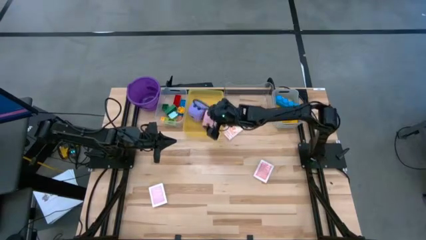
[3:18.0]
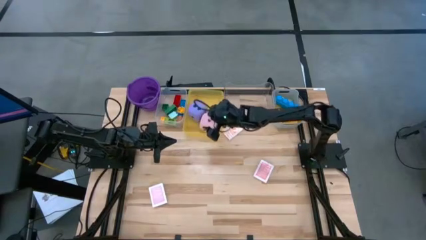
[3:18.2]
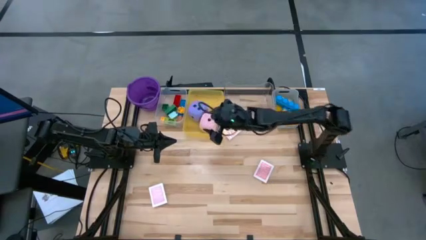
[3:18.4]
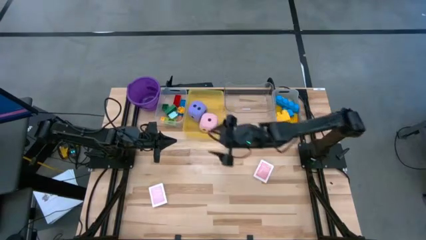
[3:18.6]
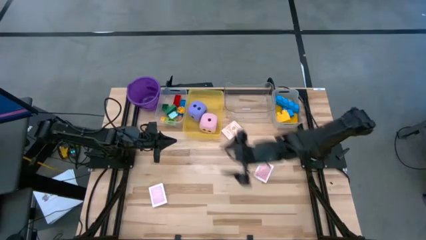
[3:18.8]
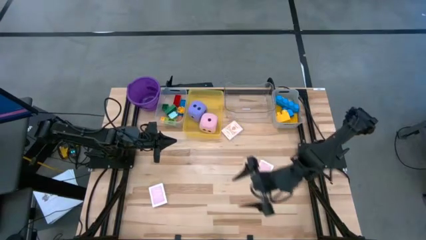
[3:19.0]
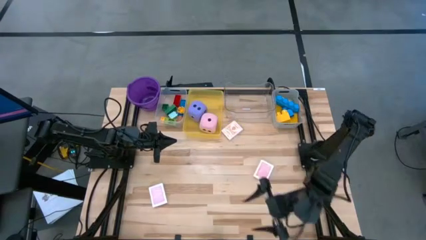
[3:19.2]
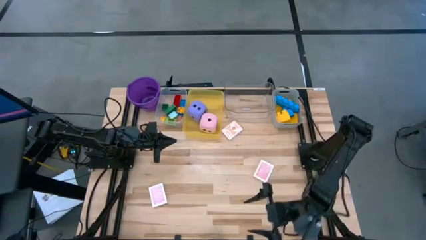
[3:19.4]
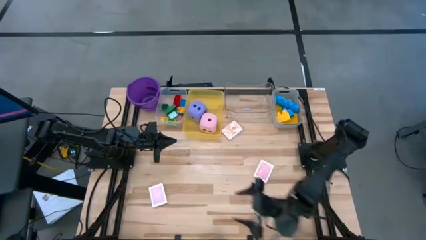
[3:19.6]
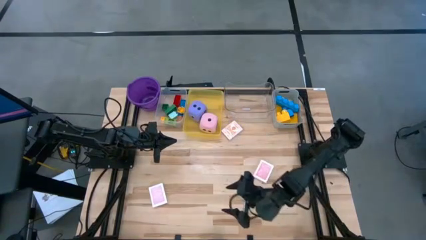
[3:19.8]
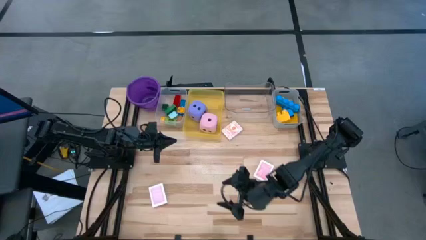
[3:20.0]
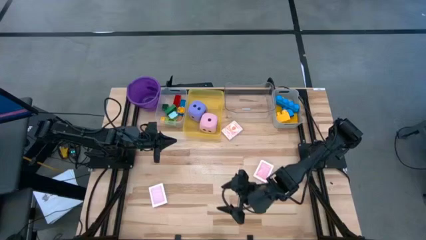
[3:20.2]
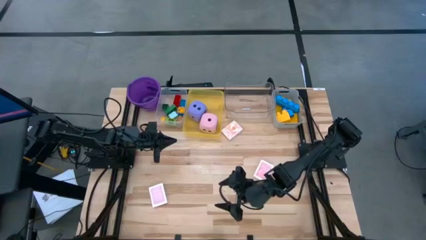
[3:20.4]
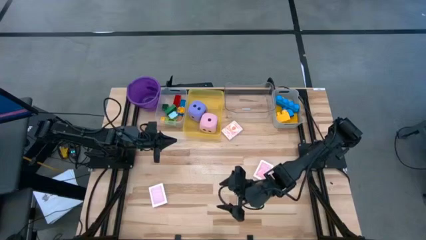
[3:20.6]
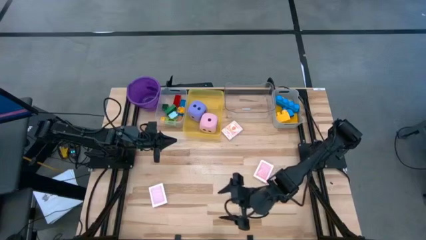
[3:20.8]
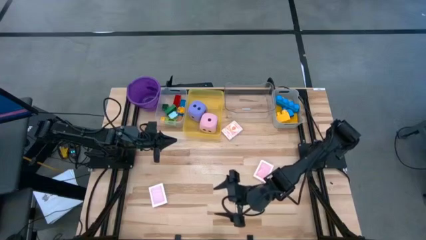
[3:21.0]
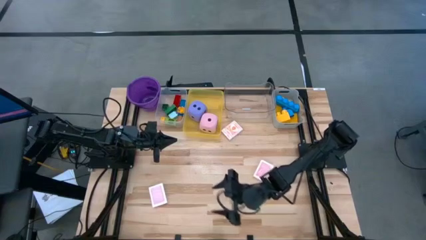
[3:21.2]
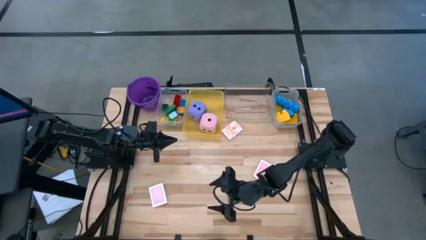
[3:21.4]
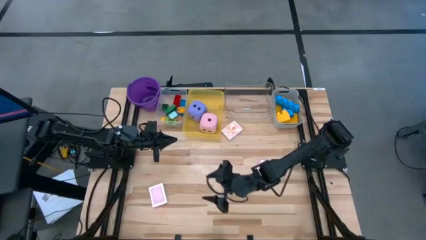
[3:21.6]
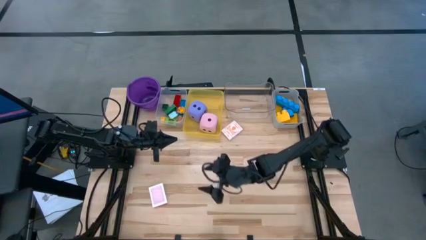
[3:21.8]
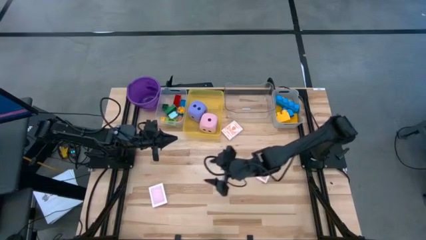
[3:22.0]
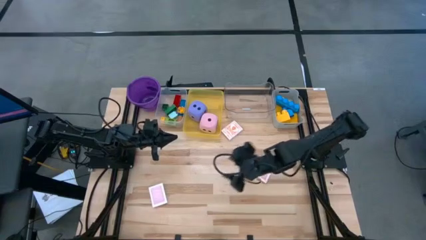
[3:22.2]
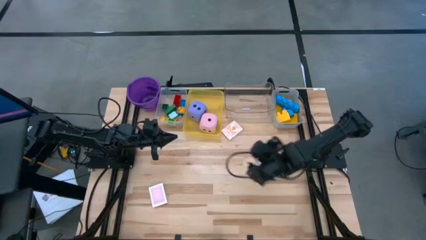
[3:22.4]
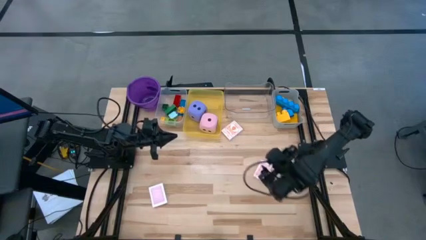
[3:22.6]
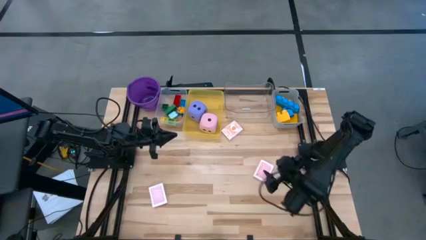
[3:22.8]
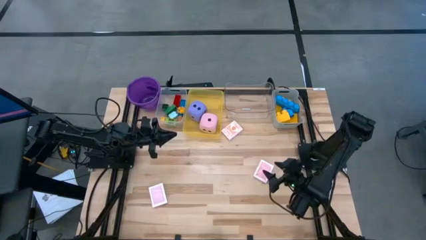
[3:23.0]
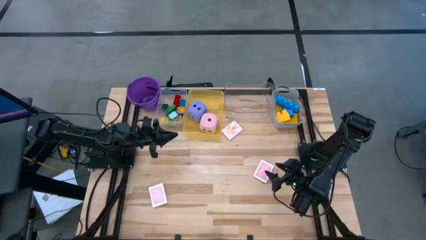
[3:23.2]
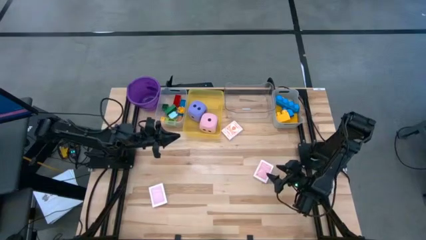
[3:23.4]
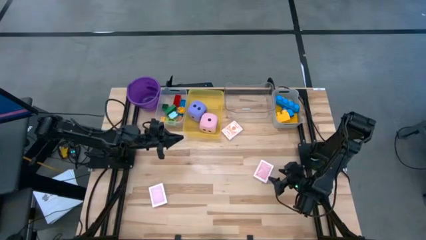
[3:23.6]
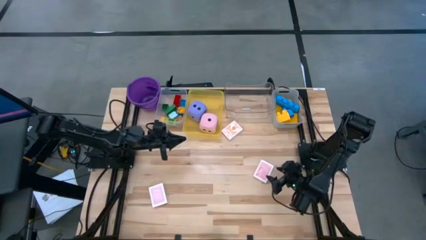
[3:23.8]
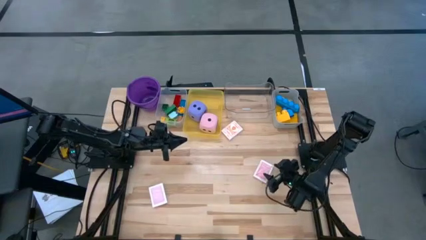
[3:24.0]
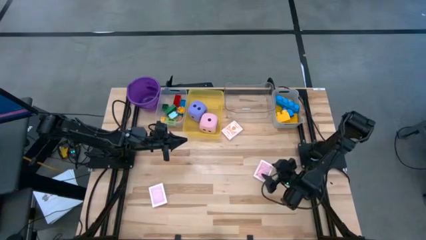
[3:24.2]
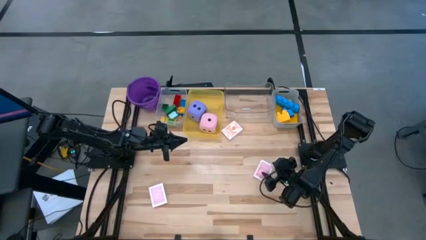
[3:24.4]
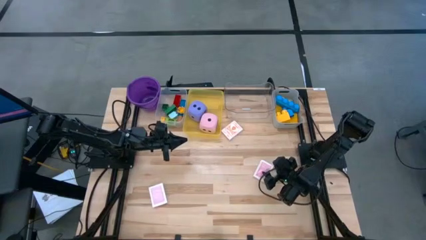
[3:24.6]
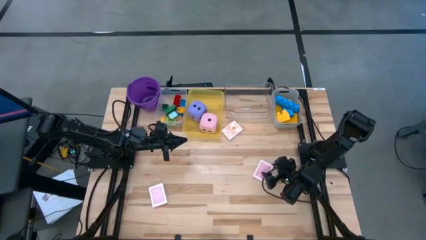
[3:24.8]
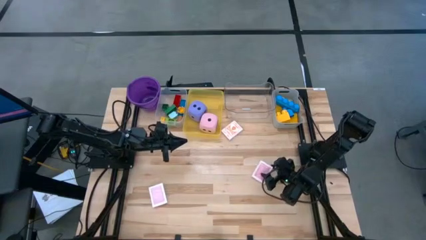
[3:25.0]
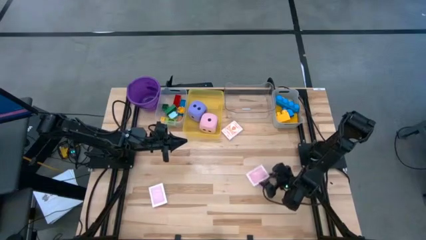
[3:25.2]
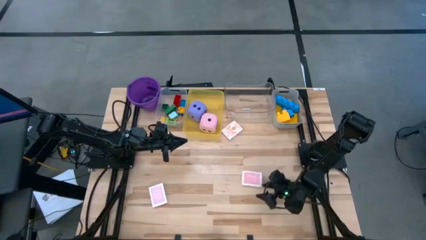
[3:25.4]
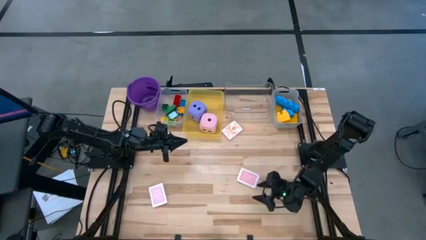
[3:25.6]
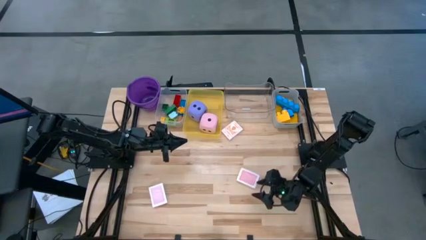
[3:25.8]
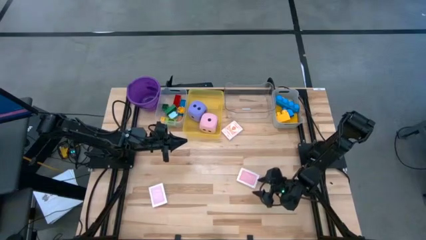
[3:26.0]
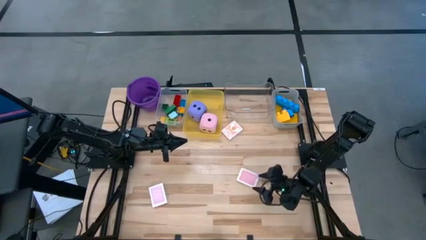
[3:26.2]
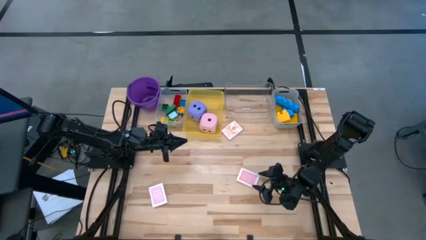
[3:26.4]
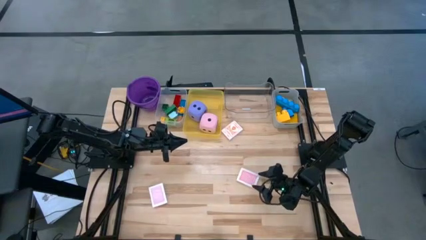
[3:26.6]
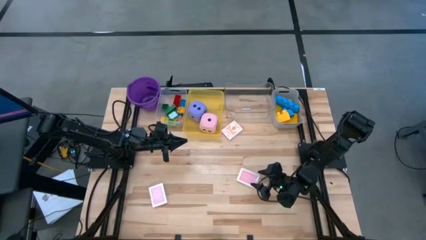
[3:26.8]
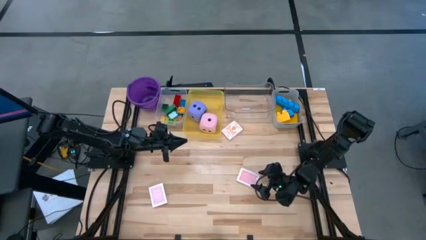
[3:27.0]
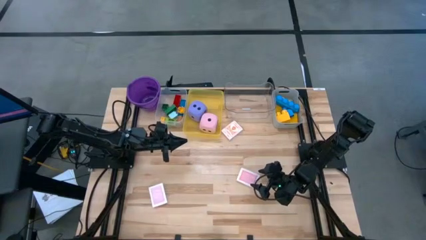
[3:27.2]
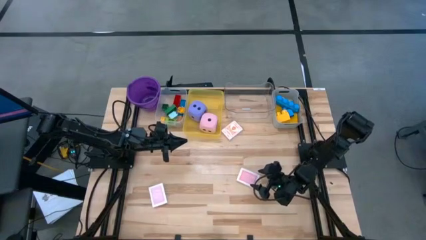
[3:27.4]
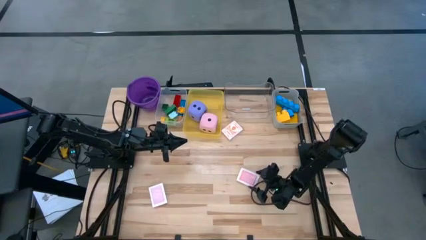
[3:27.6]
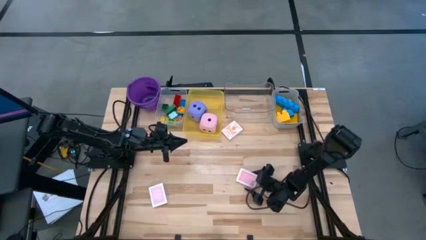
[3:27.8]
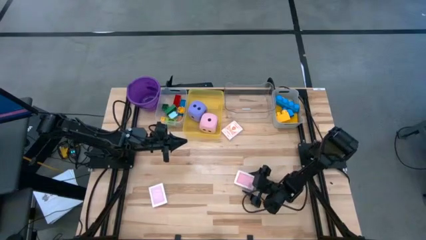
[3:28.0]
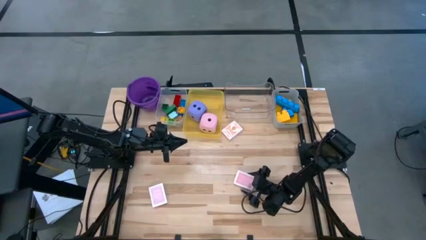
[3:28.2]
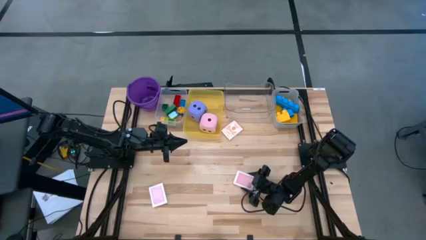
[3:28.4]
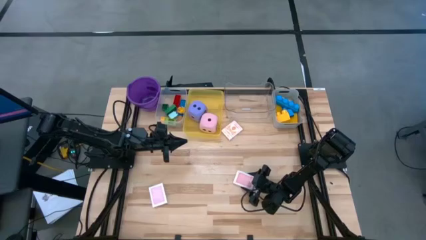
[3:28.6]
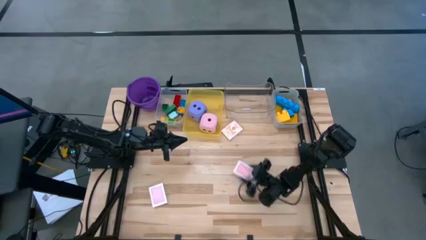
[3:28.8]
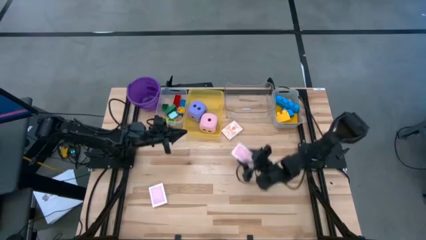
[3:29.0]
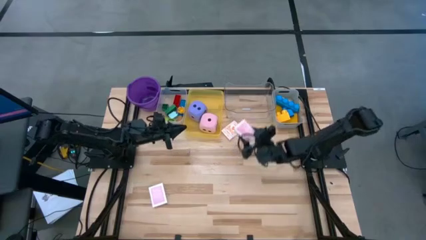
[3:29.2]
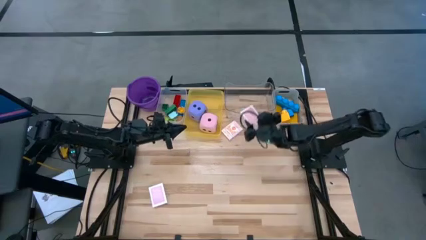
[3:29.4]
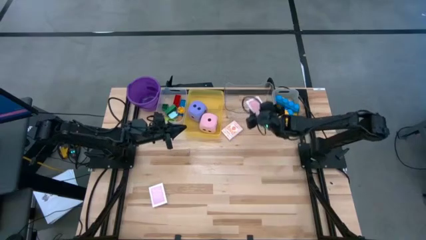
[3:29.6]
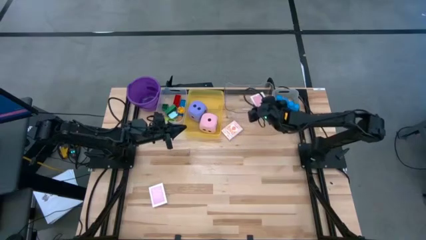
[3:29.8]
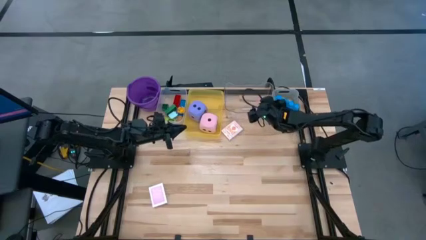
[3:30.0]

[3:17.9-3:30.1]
Task: Pick & Place Toys
Put the red playing card into the transparent bin

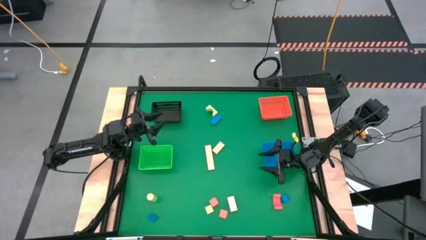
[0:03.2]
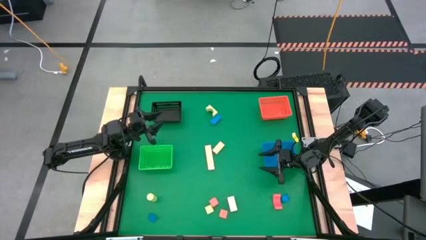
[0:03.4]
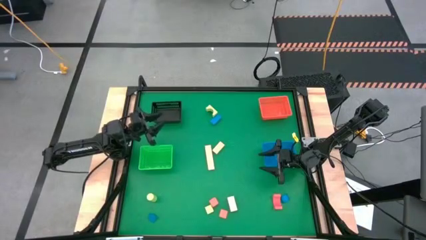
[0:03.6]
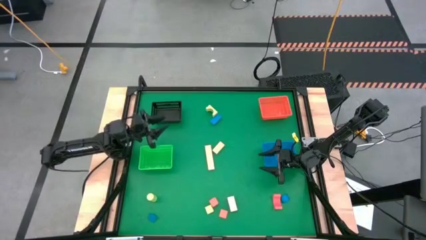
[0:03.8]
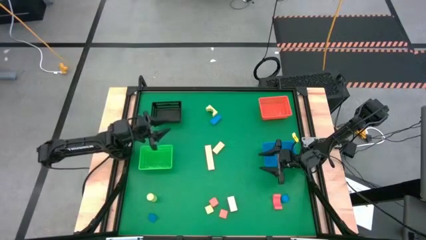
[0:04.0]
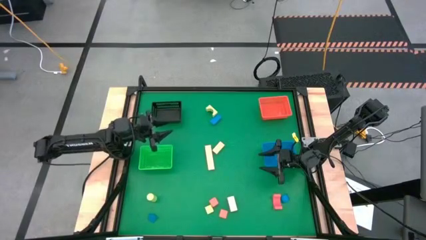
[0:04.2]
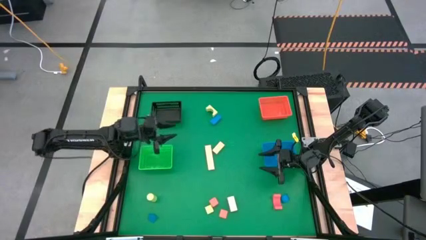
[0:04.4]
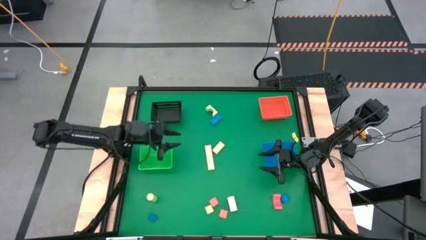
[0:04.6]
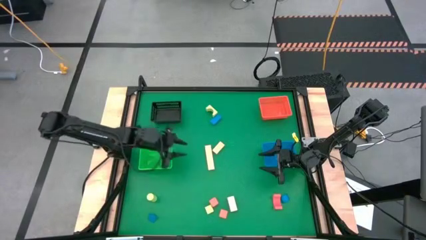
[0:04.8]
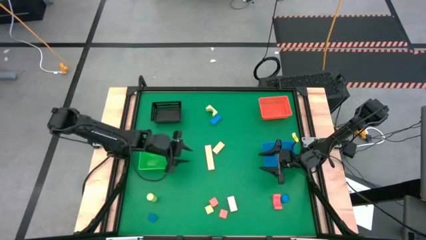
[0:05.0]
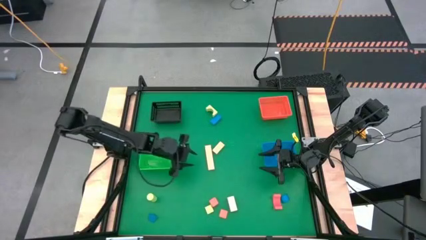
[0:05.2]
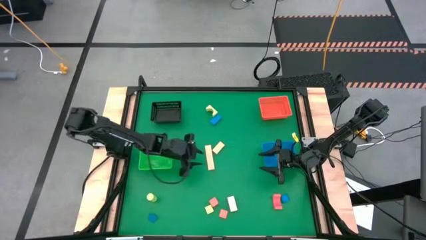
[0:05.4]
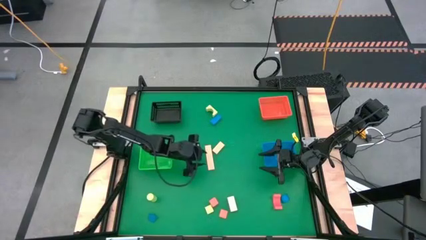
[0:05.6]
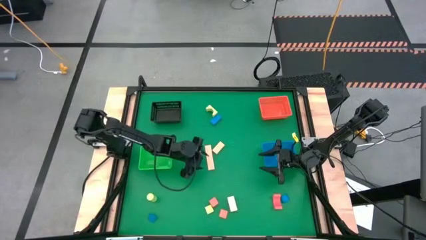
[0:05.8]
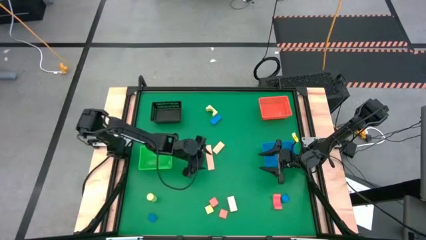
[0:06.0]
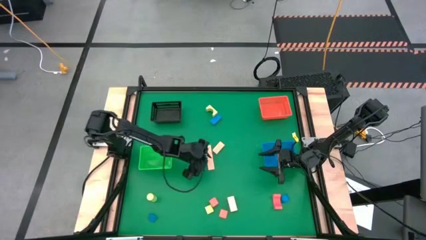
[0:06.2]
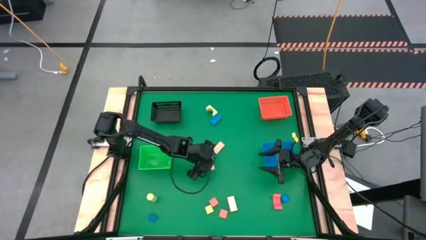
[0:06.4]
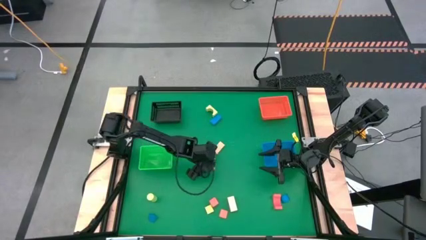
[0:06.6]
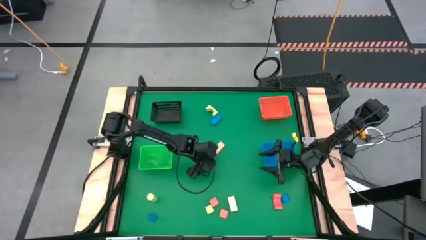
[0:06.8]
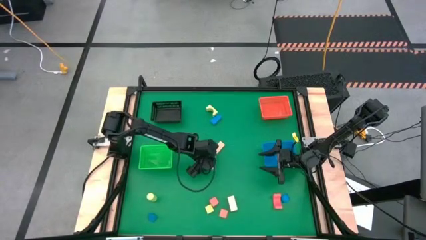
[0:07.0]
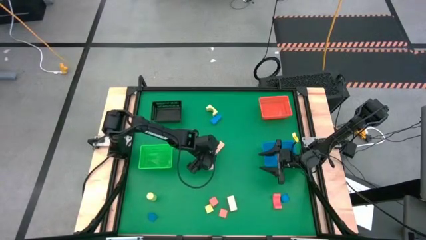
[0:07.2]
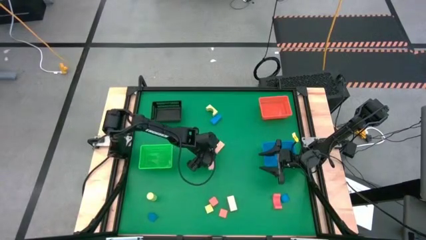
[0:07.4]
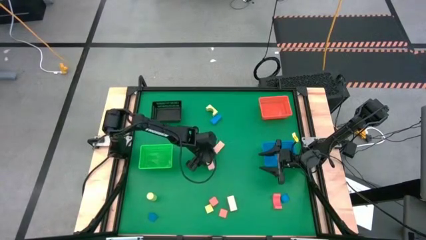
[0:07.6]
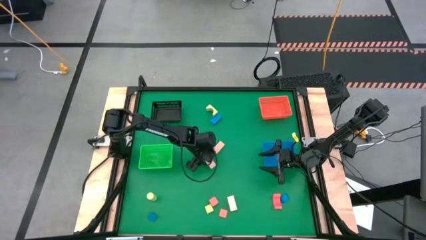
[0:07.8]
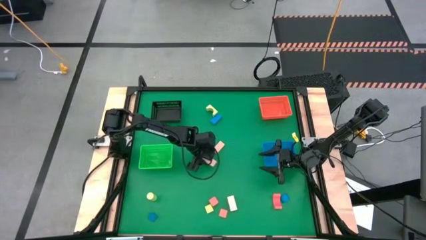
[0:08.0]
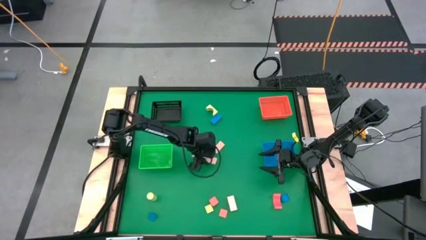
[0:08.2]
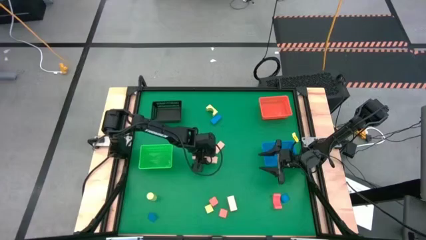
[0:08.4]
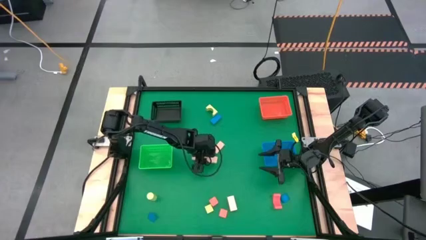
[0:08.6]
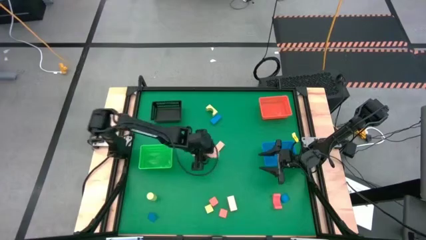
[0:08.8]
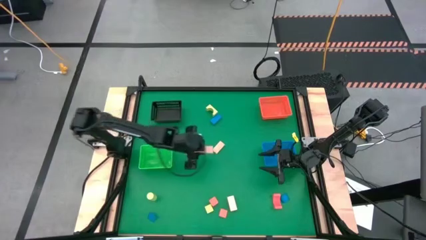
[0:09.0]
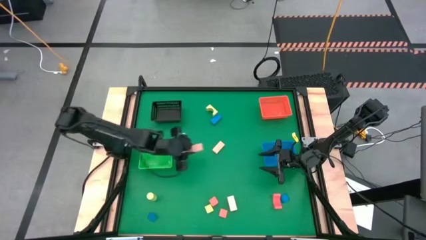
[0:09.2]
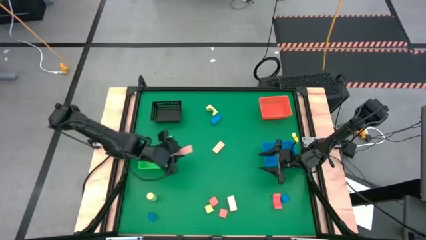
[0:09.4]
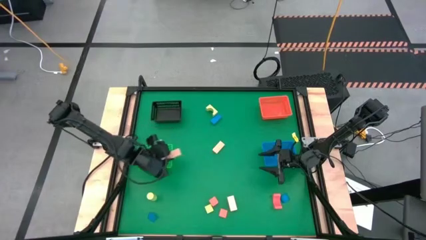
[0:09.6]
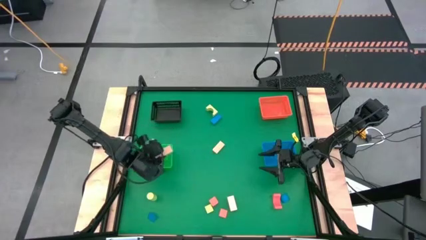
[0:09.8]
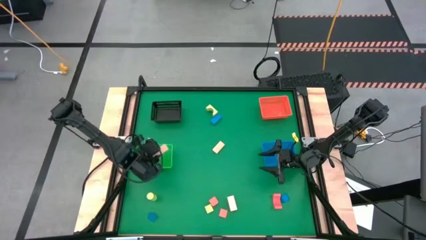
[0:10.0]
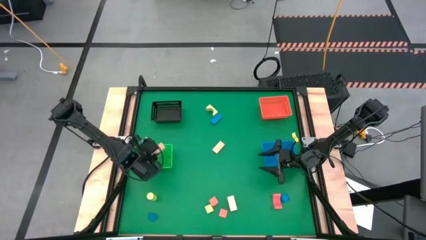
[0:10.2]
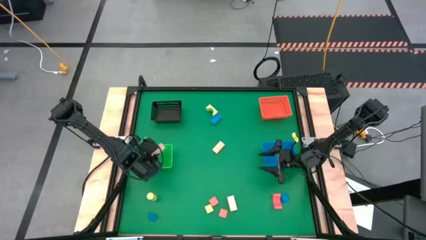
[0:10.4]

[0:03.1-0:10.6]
Task: Sort & place blocks by color
Put the light brown block into the green bin
